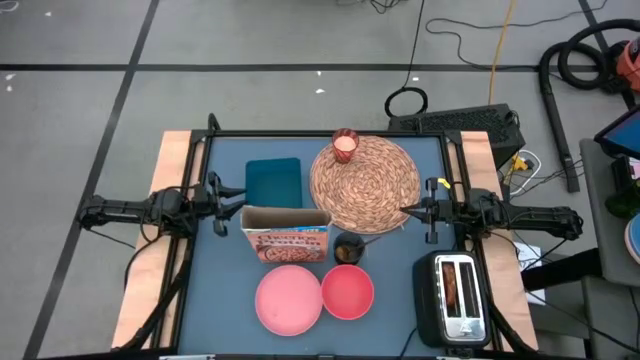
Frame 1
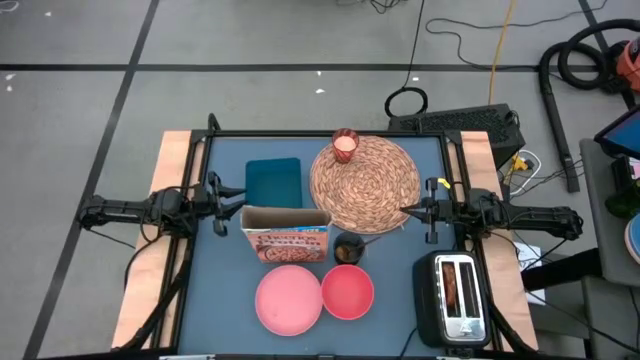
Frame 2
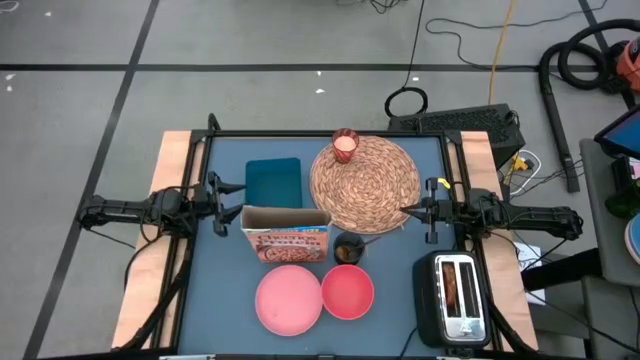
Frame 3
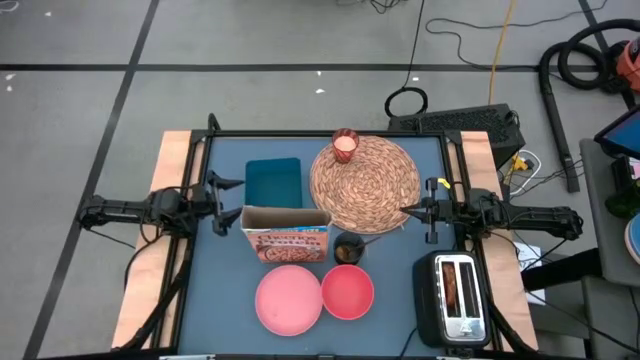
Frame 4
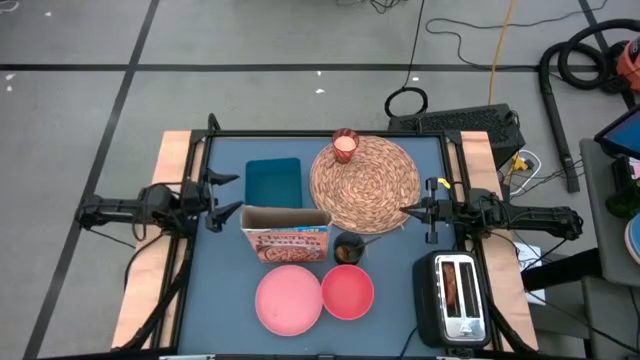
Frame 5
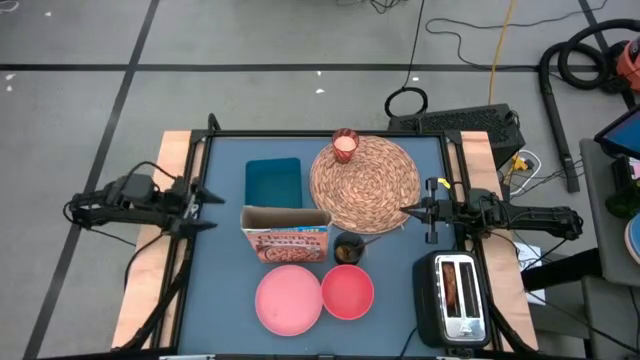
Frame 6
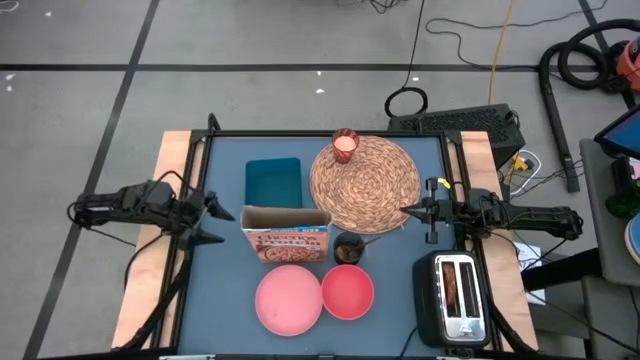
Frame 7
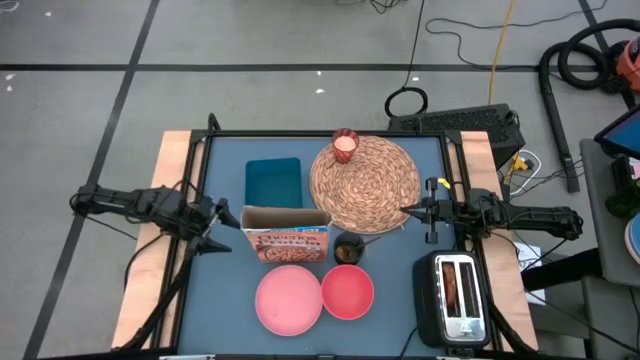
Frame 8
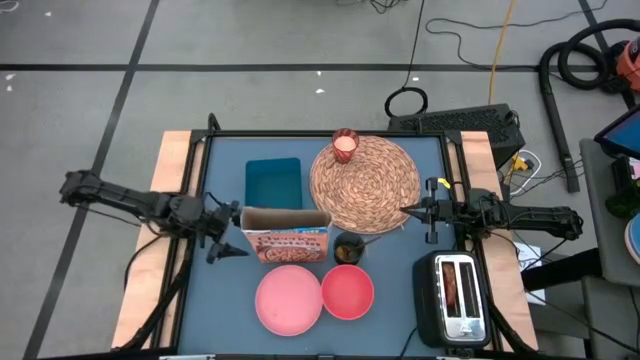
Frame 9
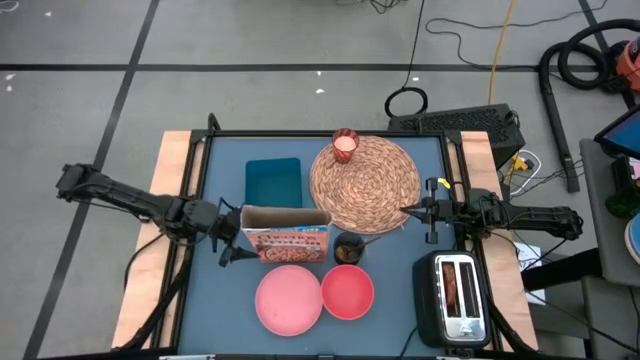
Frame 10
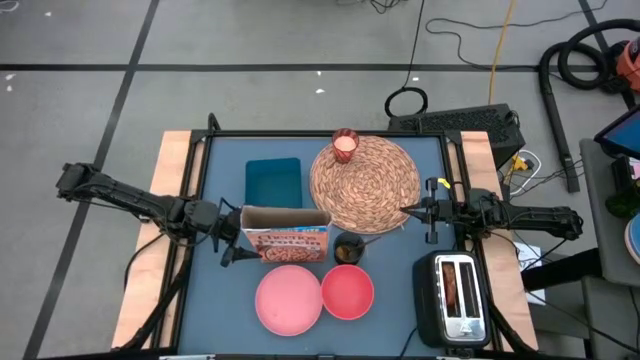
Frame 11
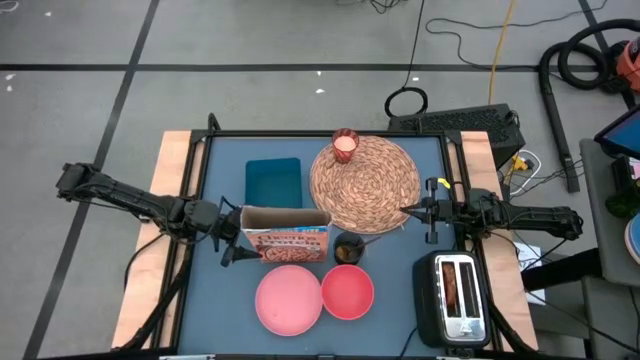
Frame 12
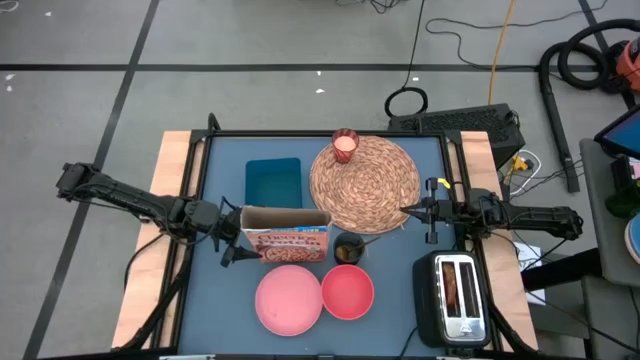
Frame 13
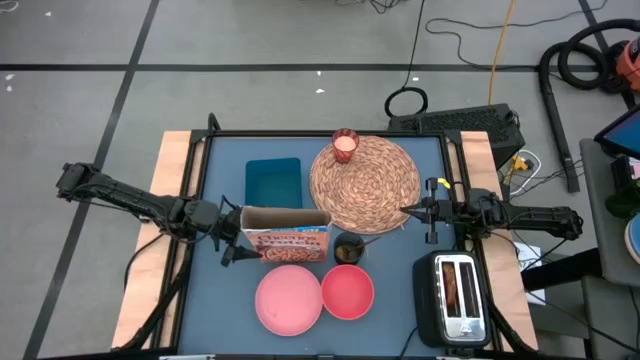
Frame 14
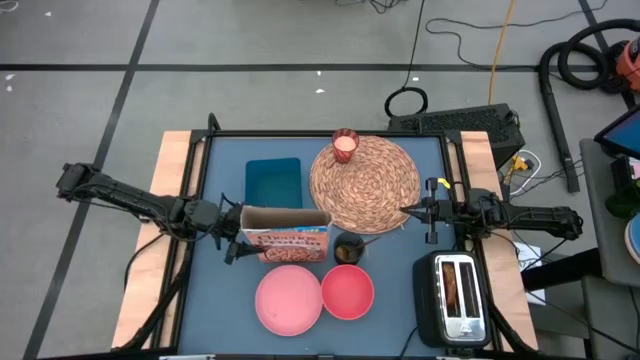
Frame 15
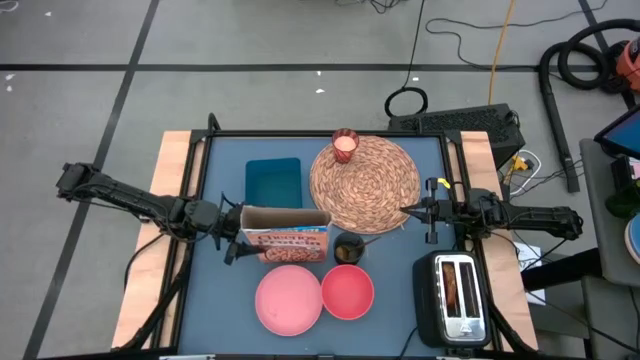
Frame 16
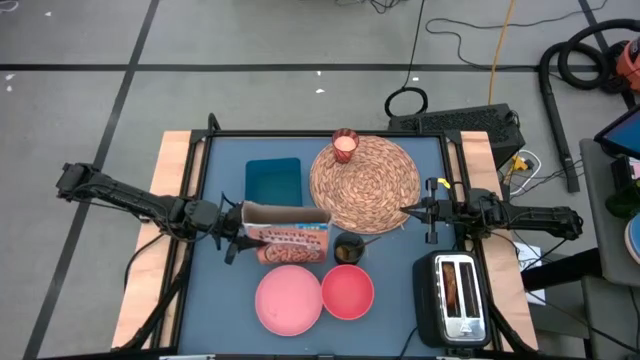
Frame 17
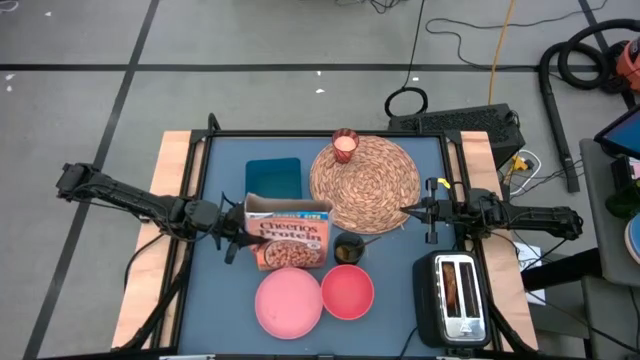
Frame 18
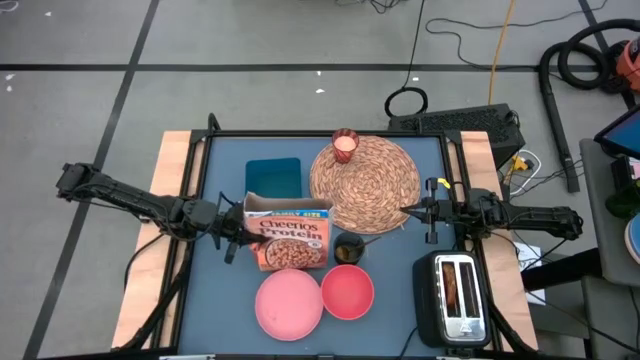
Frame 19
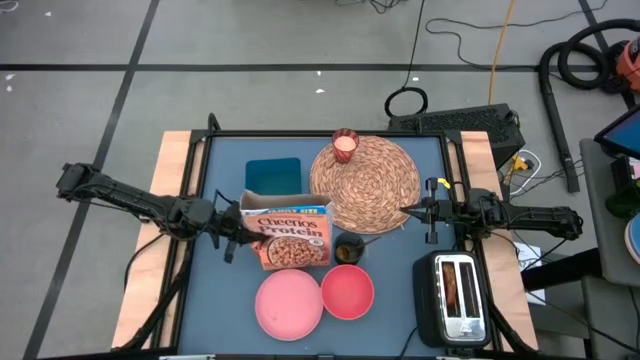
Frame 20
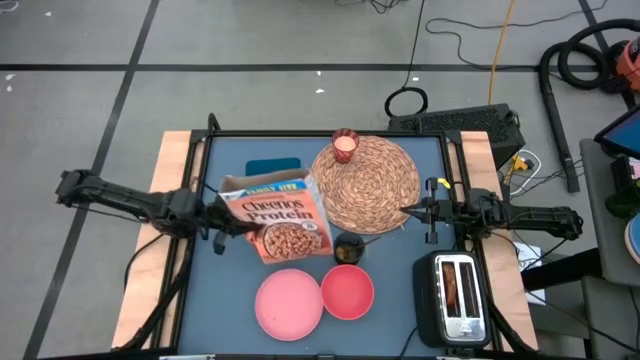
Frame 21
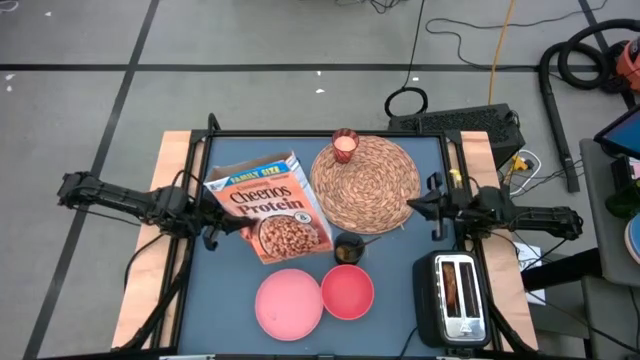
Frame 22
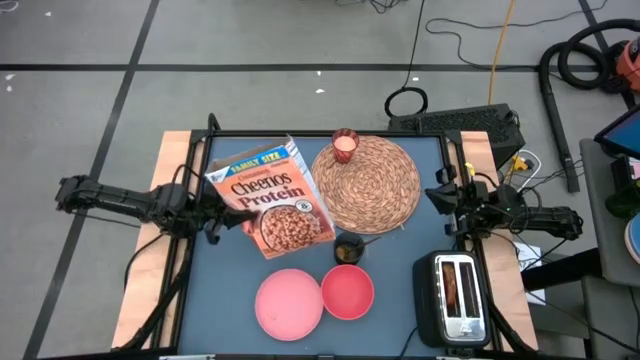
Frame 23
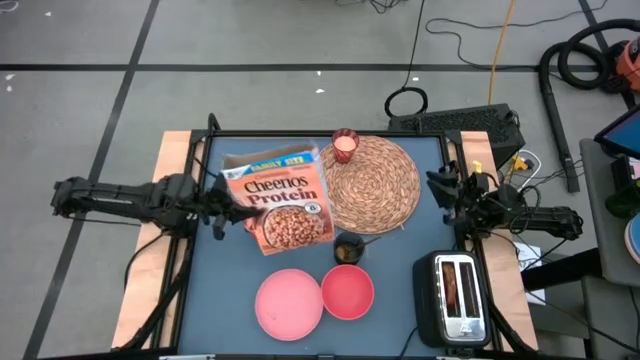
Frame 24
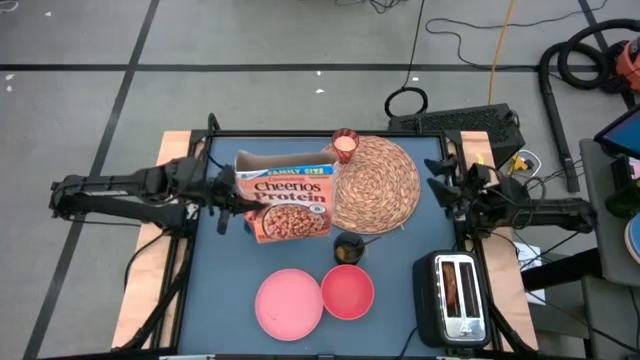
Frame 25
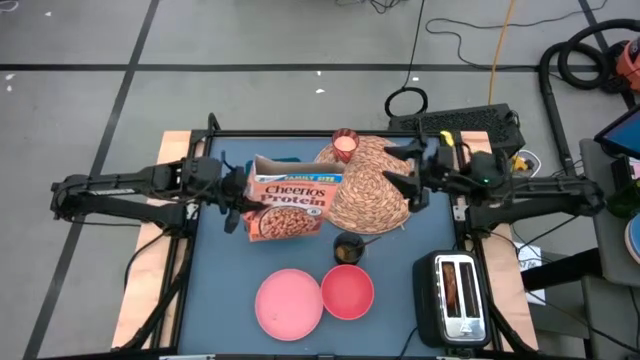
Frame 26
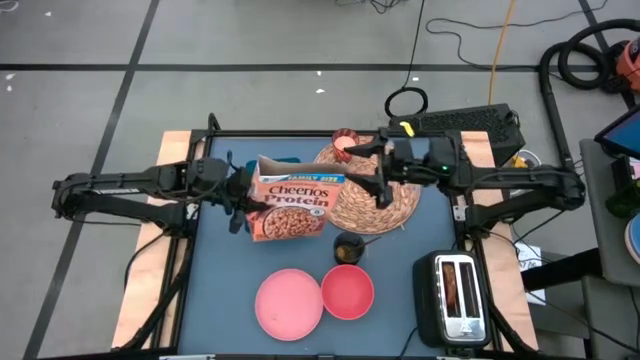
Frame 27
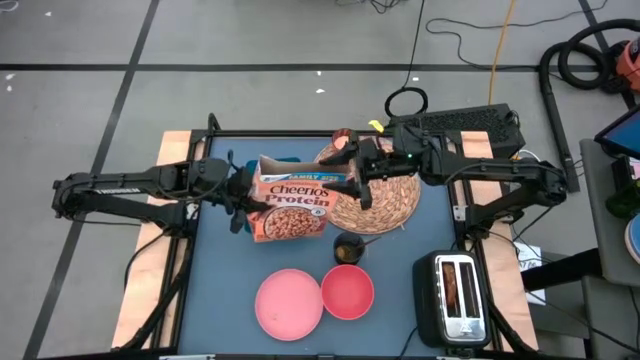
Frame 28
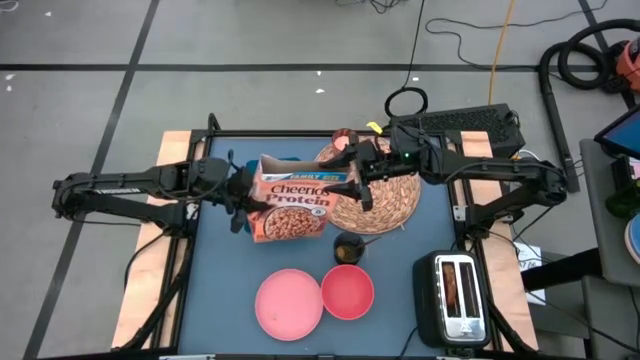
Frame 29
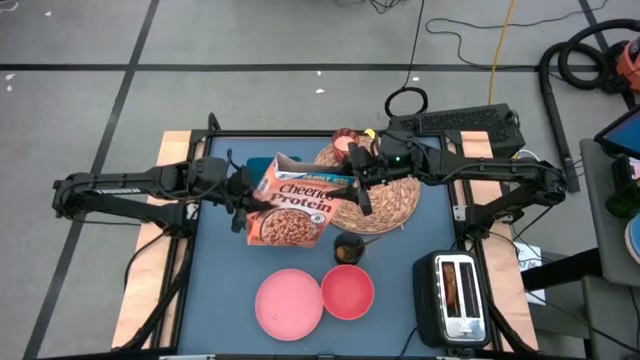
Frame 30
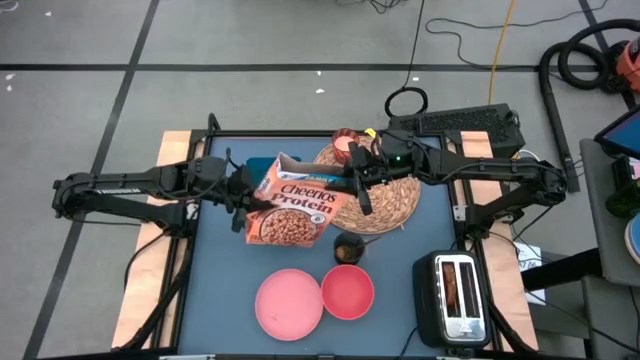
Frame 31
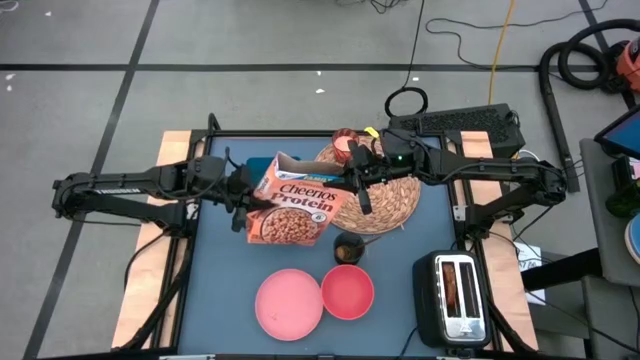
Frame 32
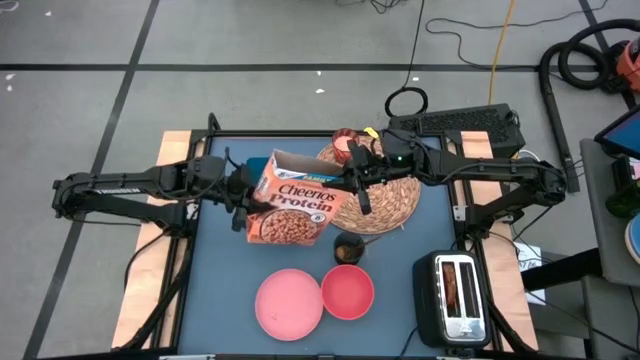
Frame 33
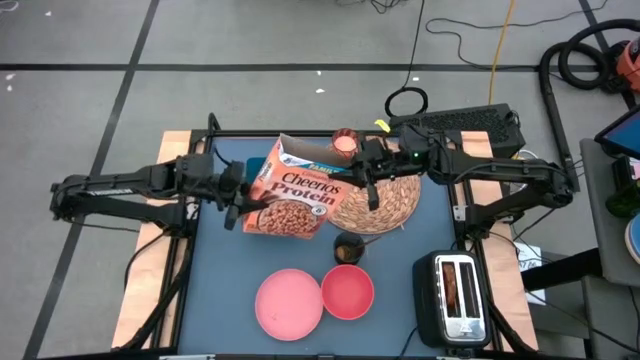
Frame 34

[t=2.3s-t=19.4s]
Task: Arrange a breakfast setting
Pour the cereal into the pink bowl
